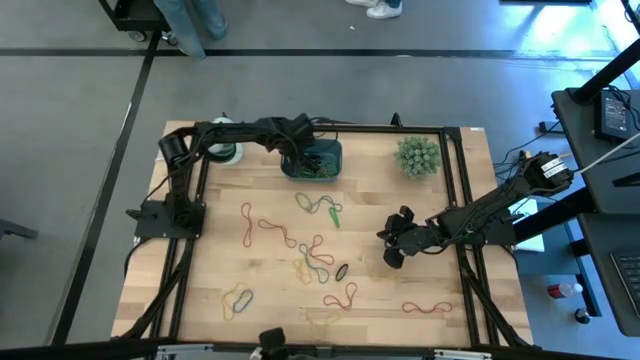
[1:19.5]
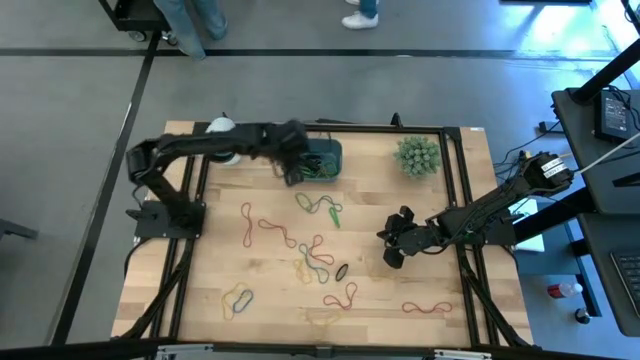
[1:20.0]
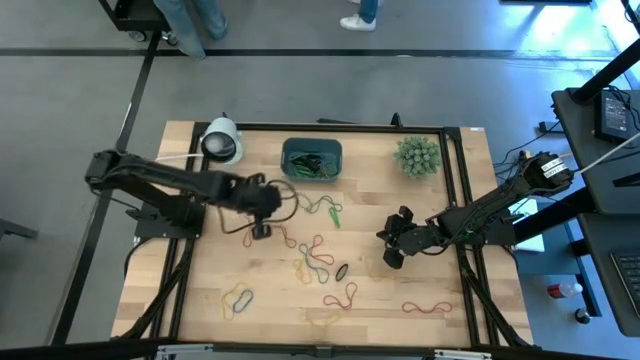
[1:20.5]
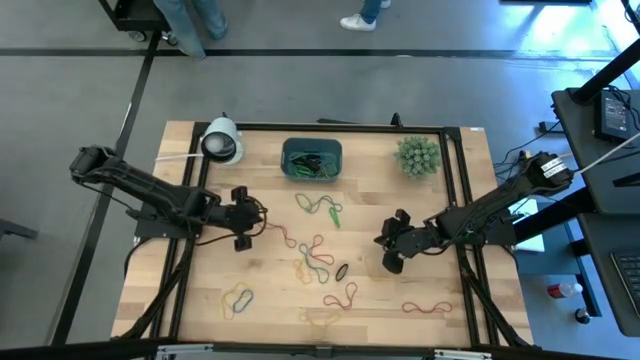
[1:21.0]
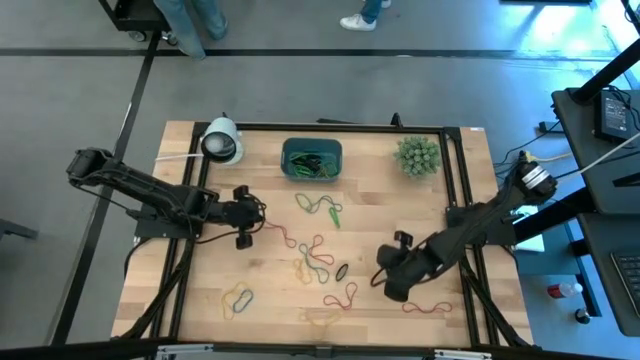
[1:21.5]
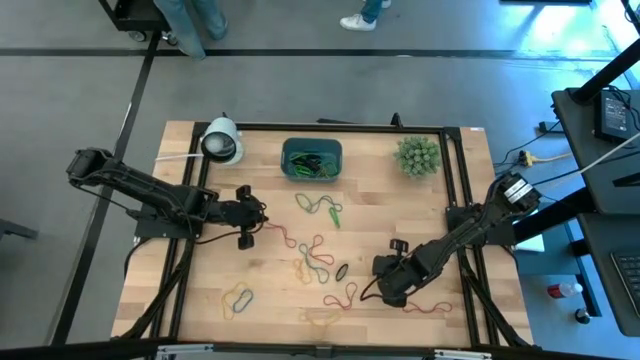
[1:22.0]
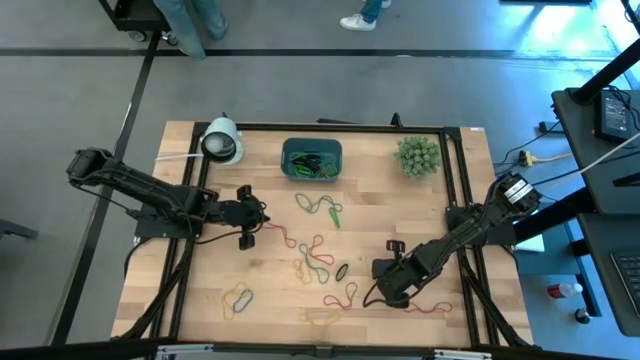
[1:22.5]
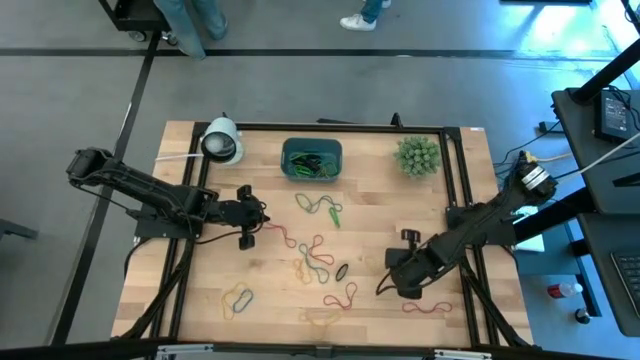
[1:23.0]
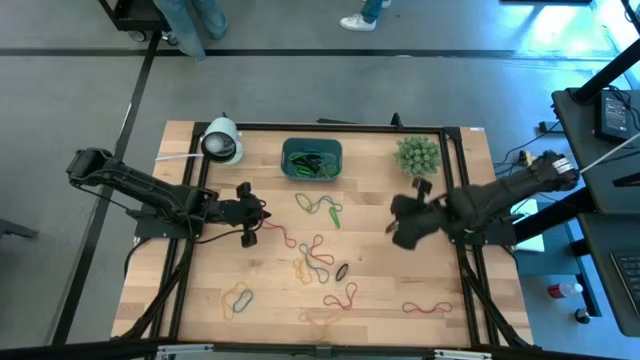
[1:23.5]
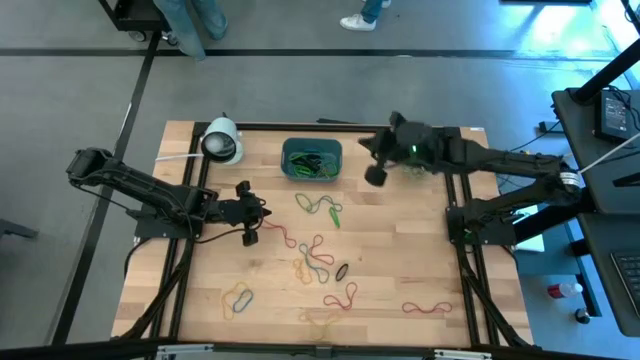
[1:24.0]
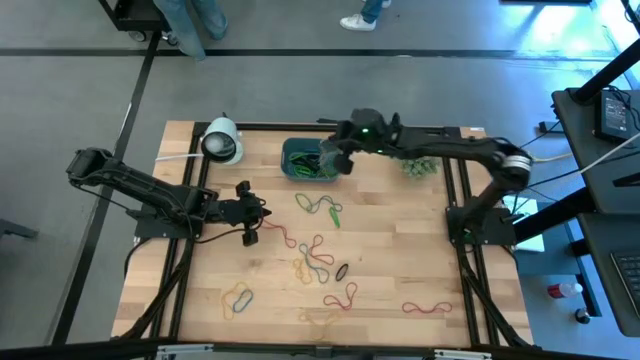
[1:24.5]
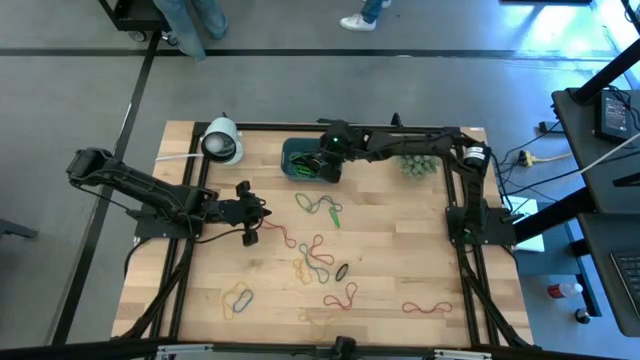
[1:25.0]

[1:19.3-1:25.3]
Task: Pick and place rubber bands into bin
Put the yellow rubber band into the blue bin

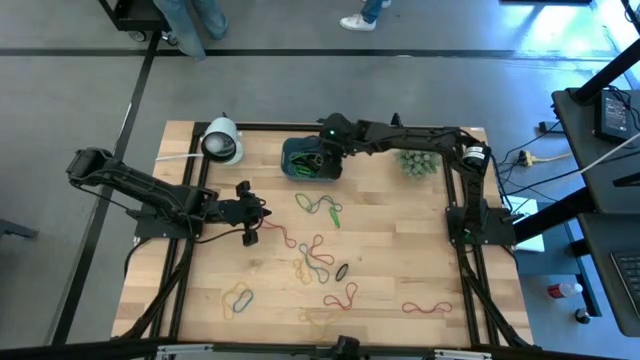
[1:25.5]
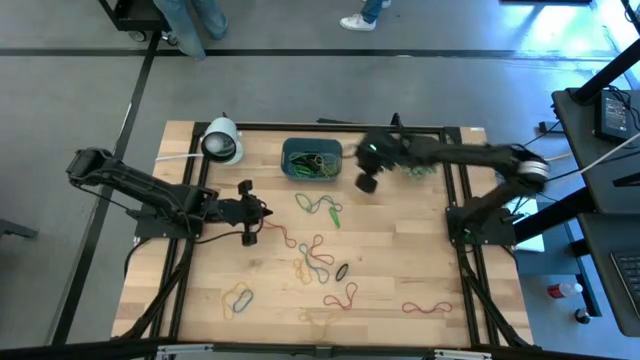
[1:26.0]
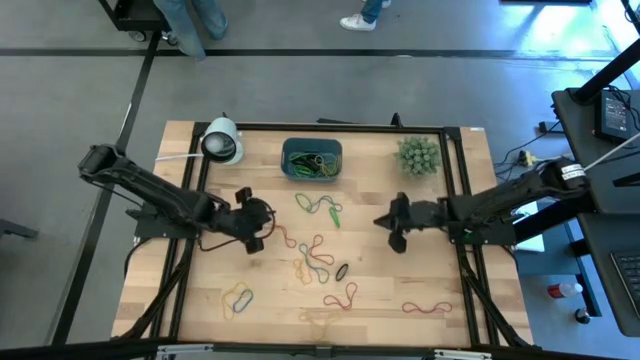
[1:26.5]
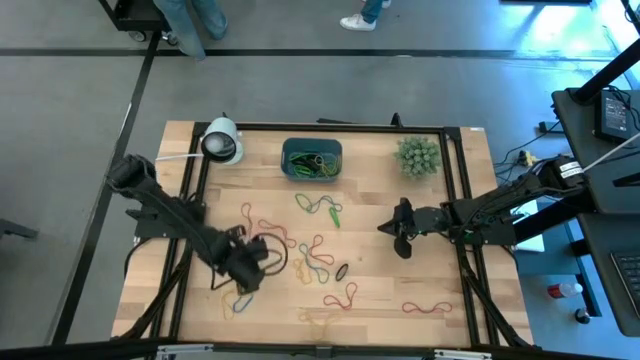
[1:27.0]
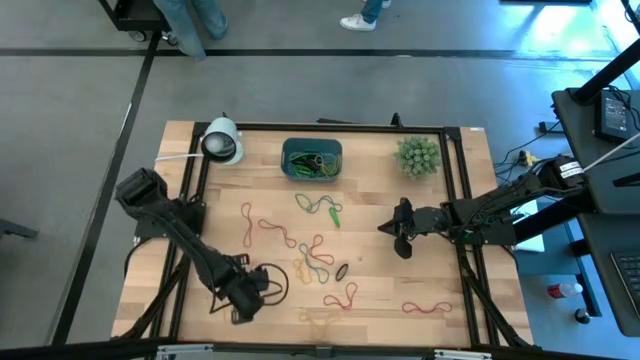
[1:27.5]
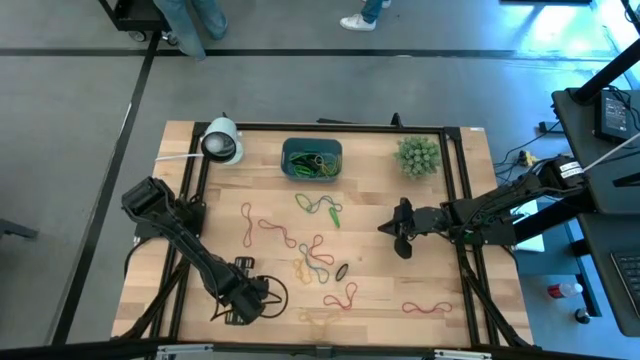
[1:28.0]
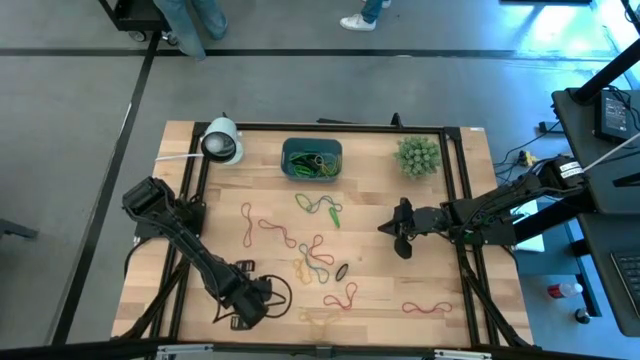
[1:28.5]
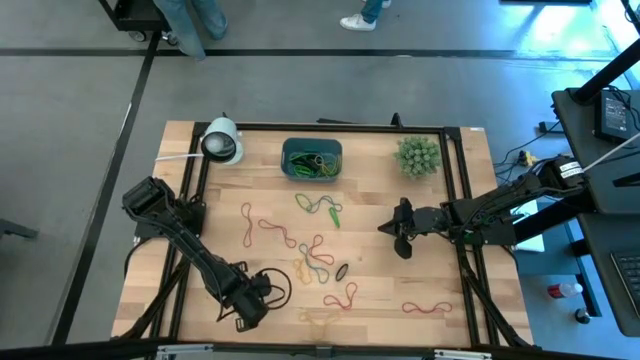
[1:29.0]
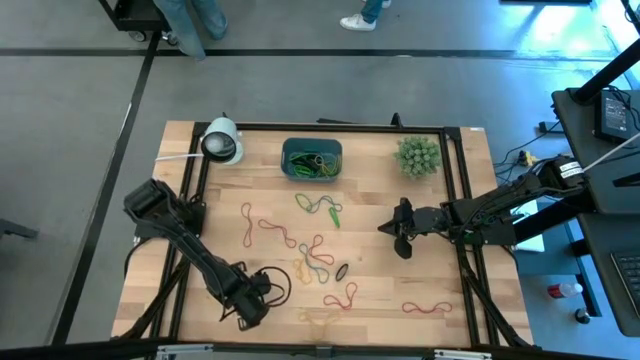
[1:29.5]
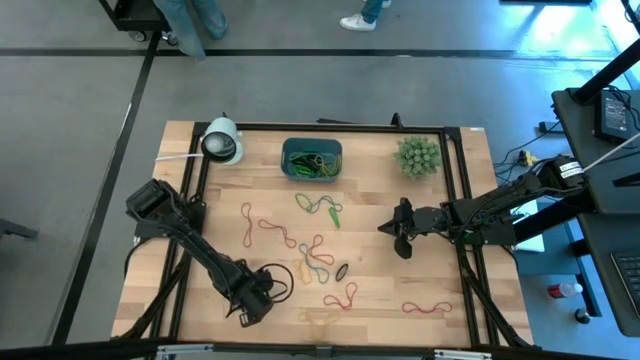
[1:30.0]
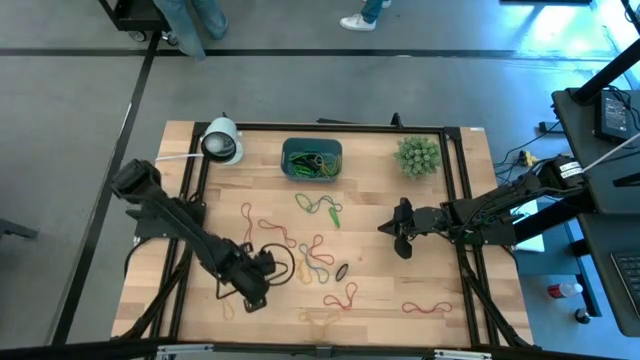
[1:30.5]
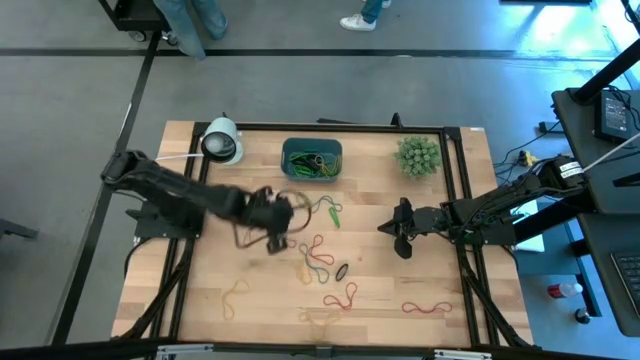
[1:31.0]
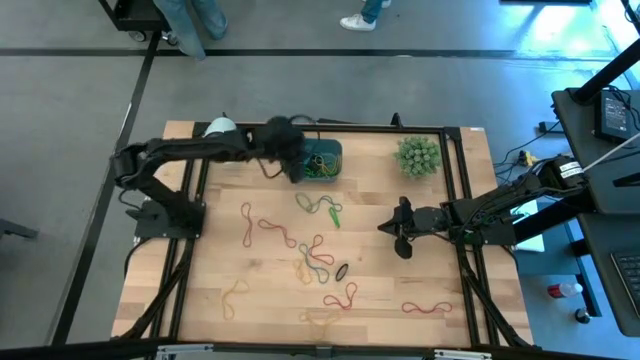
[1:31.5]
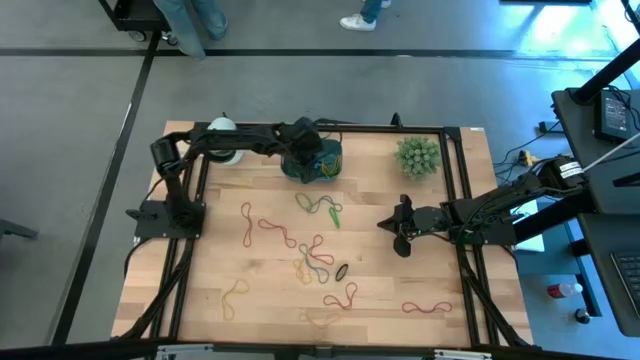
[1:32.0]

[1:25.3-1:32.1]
Put the blue rubber band into the blue bin

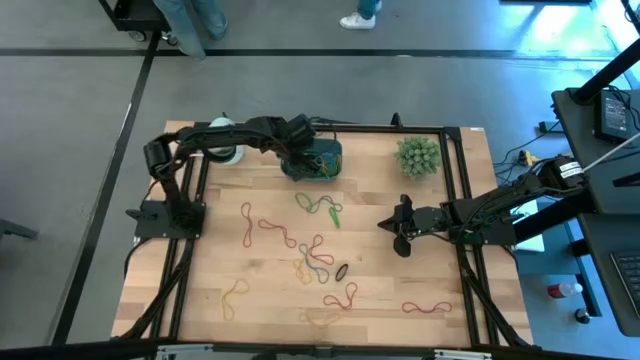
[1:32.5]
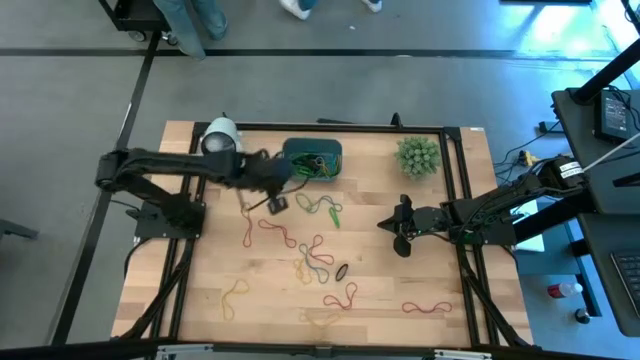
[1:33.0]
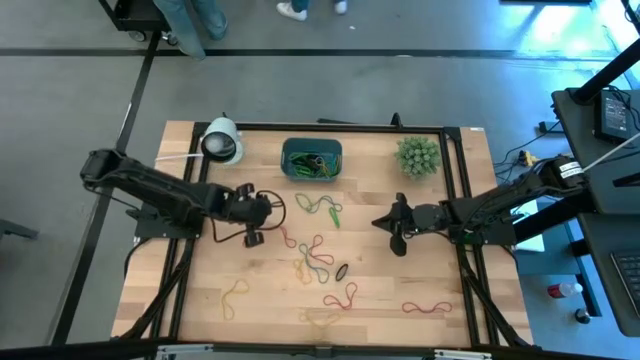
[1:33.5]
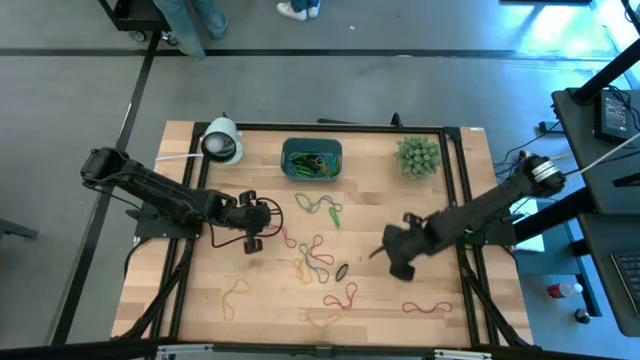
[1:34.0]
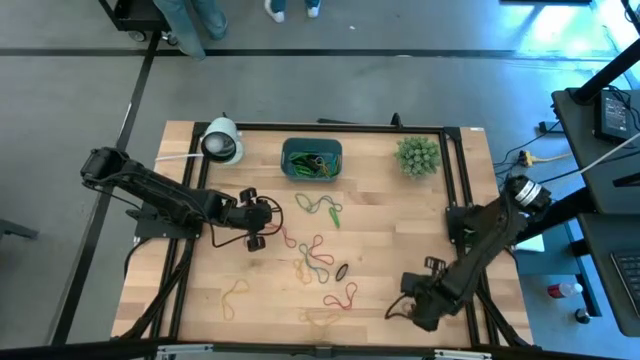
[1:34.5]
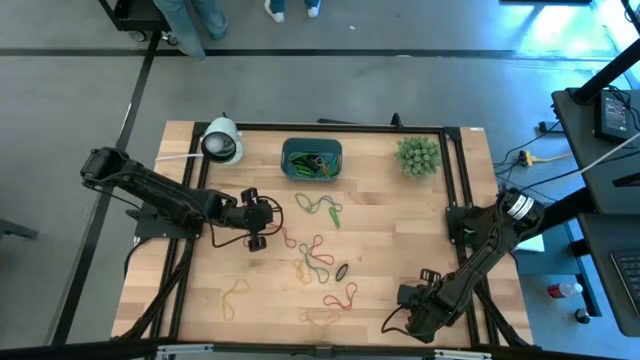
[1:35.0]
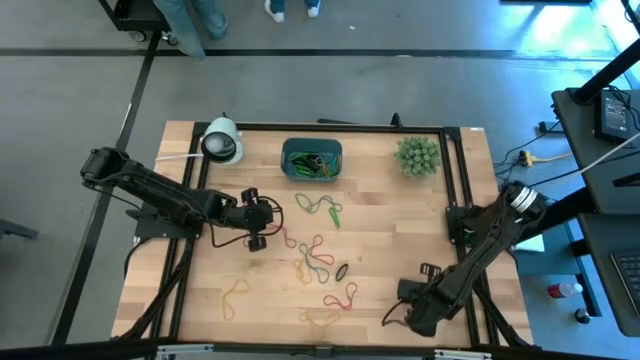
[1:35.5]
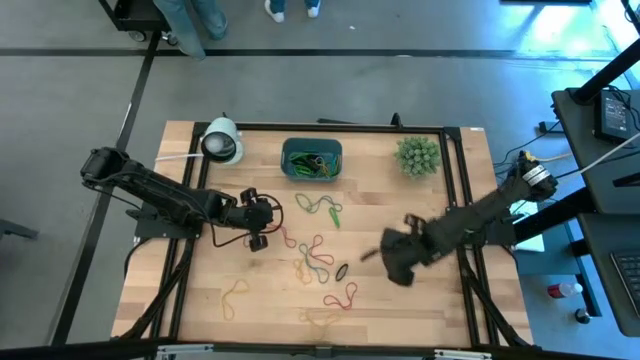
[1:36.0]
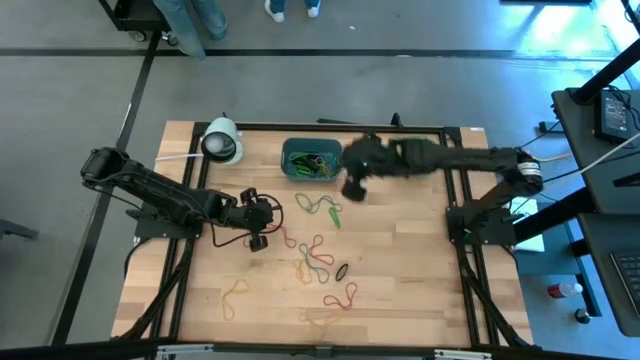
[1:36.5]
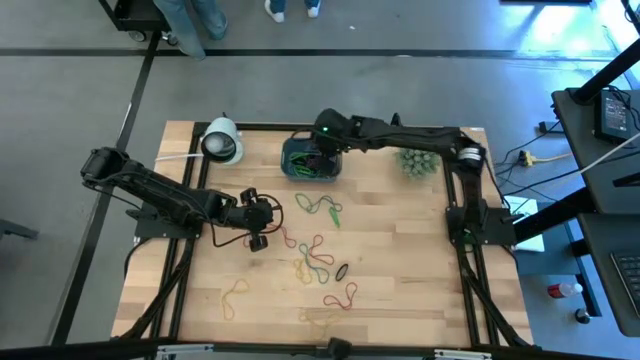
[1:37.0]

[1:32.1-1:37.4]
Put the red rubber band into the blue bin

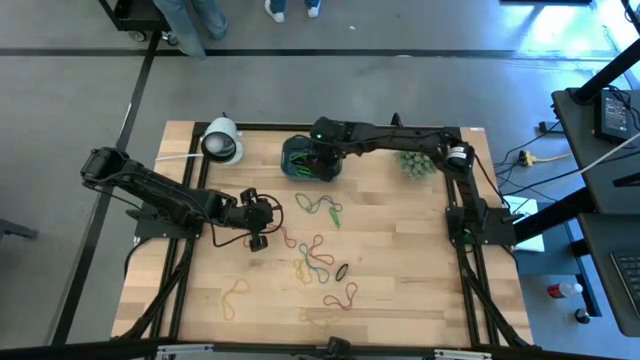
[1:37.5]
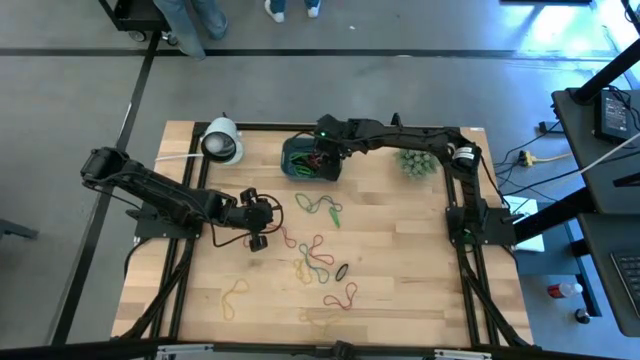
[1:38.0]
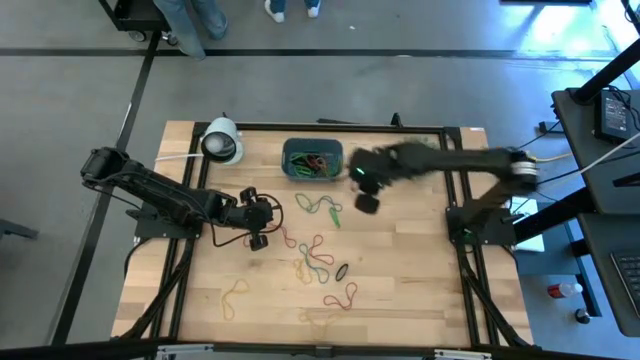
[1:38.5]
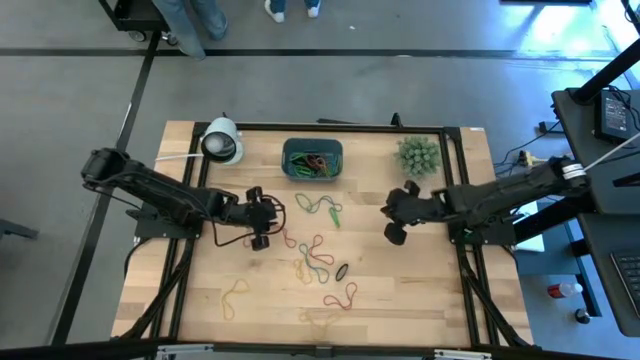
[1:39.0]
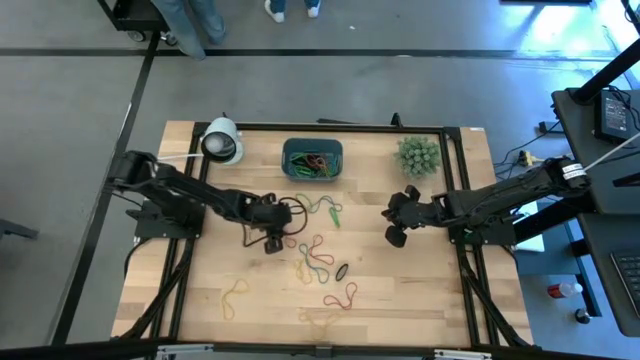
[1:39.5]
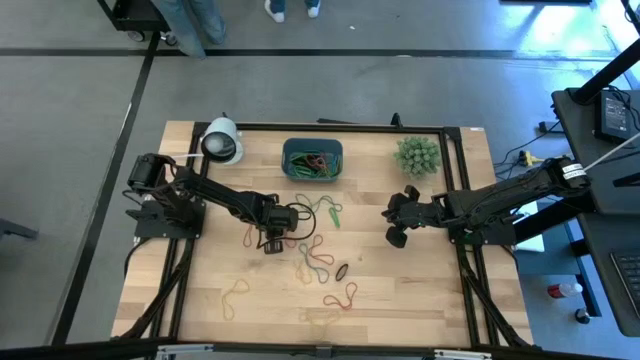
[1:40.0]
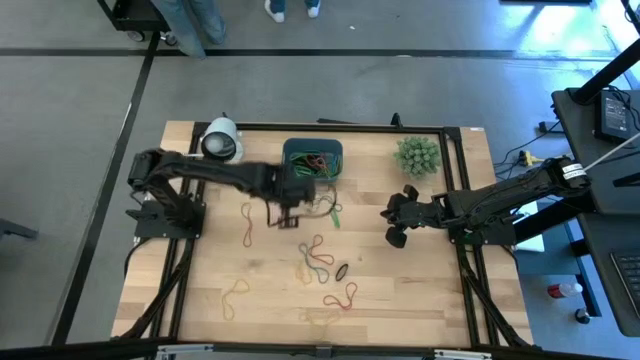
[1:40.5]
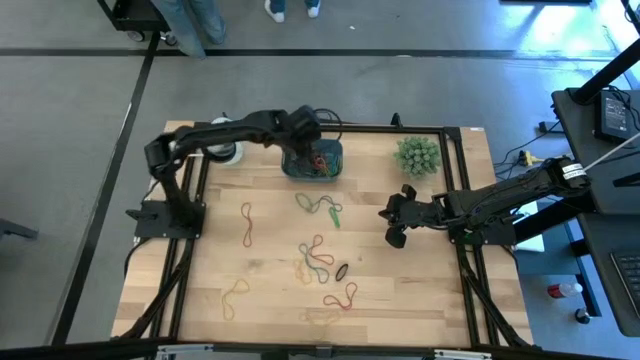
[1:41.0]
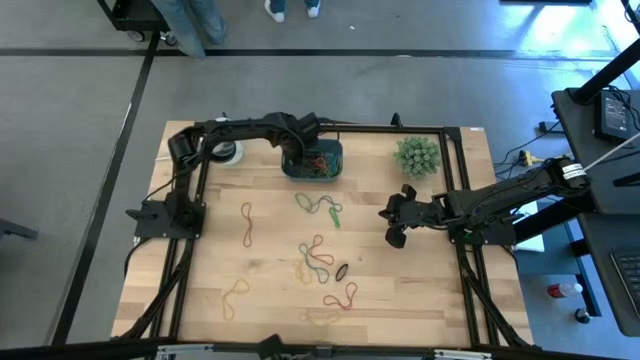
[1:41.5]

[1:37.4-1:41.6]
Put the red rubber band into the blue bin
